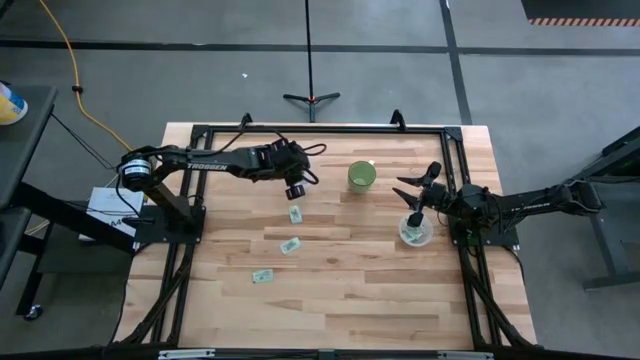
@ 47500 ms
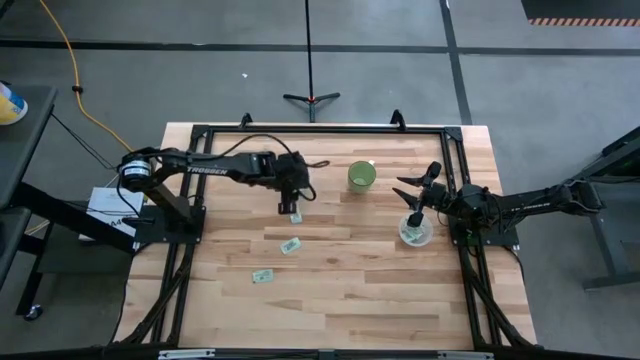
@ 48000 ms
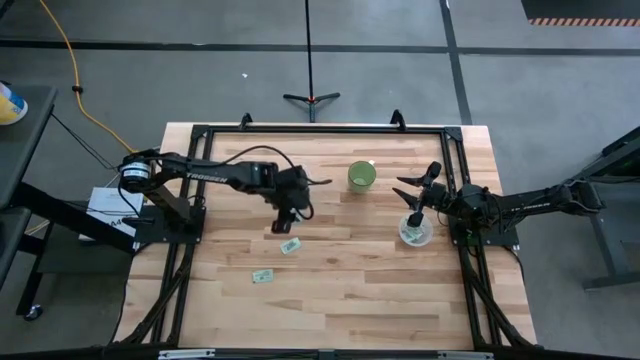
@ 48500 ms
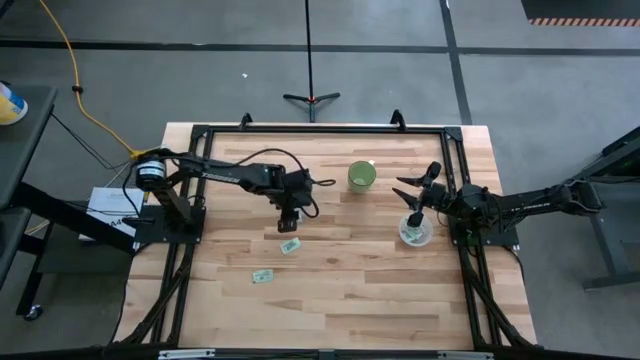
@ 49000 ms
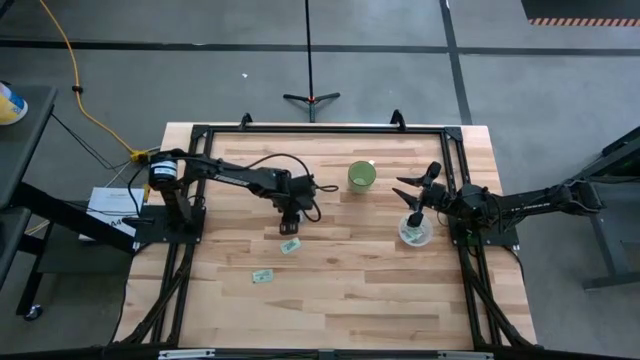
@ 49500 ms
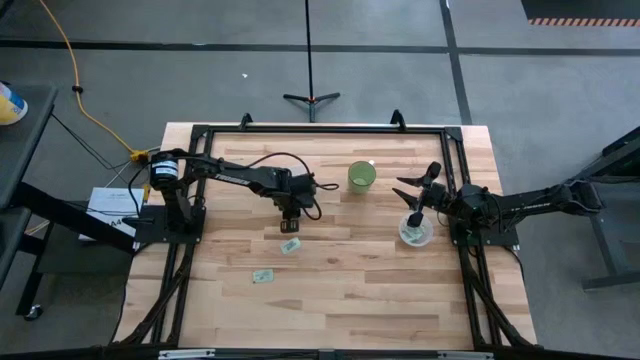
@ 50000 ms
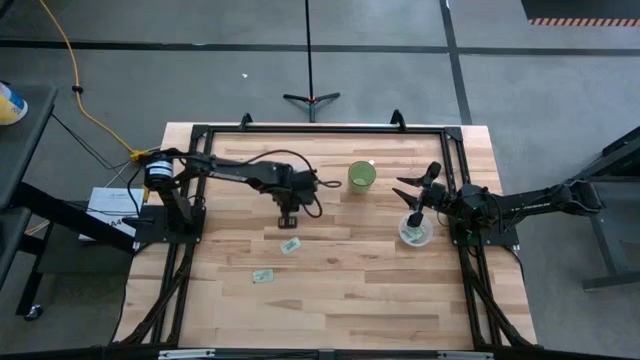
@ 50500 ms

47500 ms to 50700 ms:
Task: Pick and place items into bin
Put the white sweetener packet into the left transparent bin

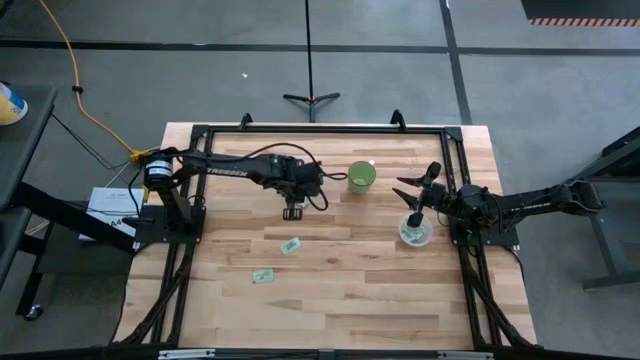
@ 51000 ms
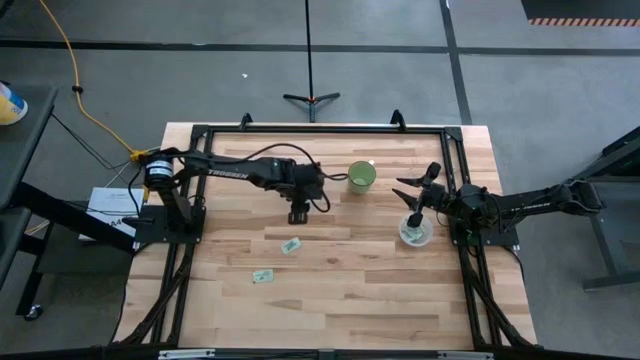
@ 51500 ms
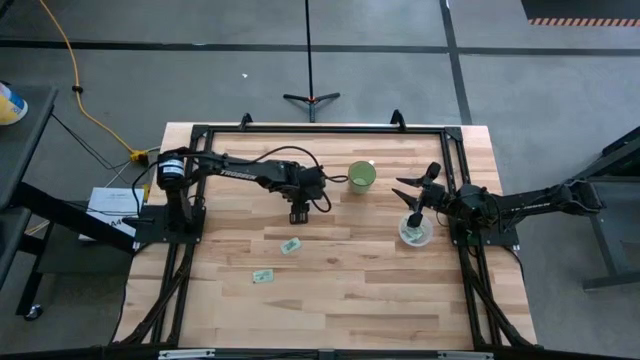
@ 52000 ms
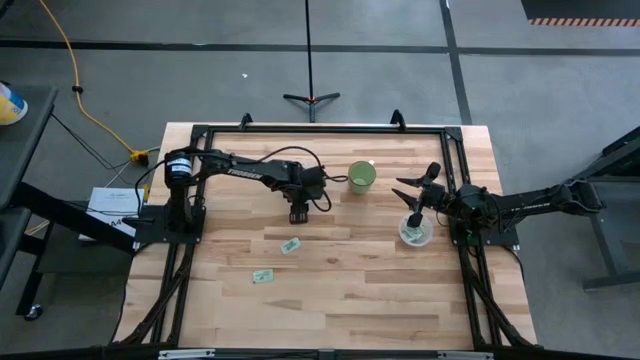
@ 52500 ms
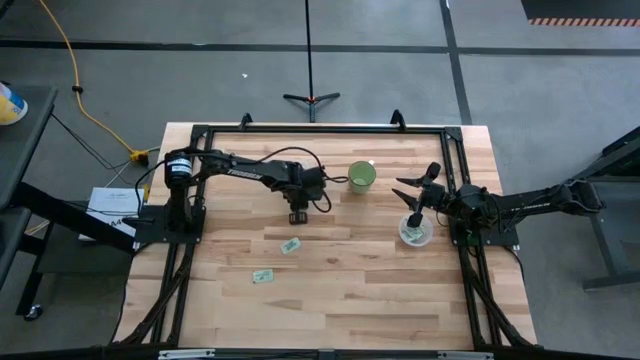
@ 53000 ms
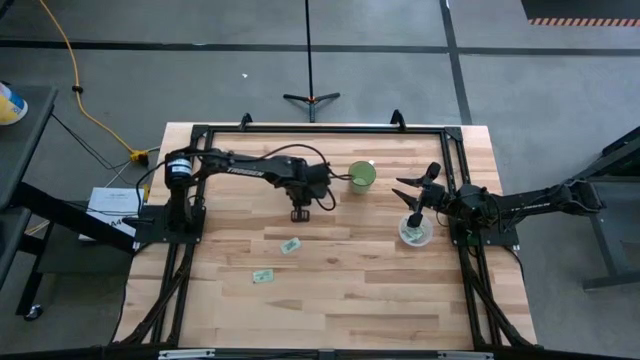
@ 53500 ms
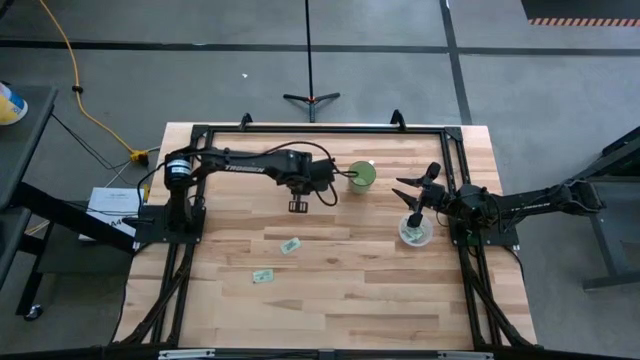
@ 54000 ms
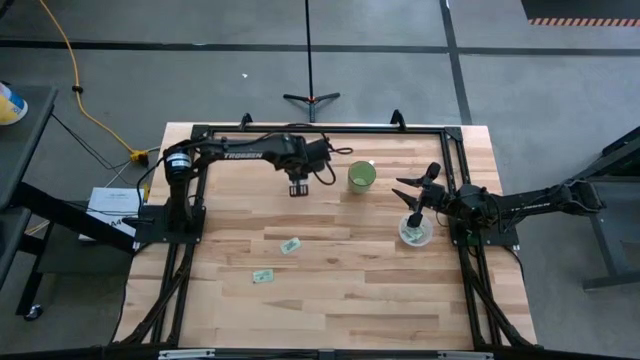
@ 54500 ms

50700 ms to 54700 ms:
Put the white sweetener packet into the left transparent bin

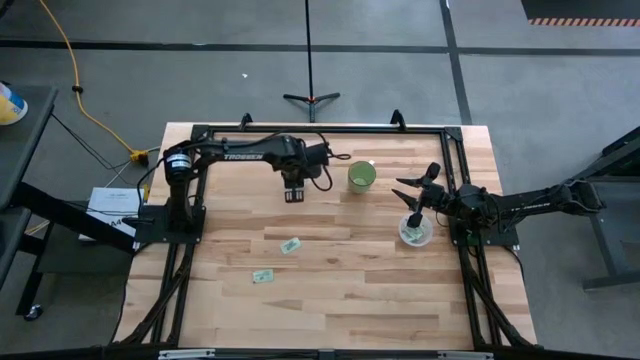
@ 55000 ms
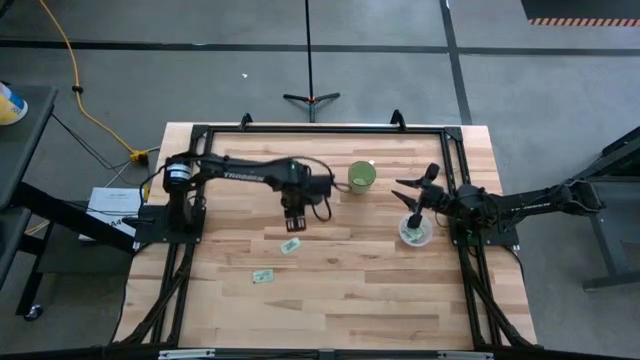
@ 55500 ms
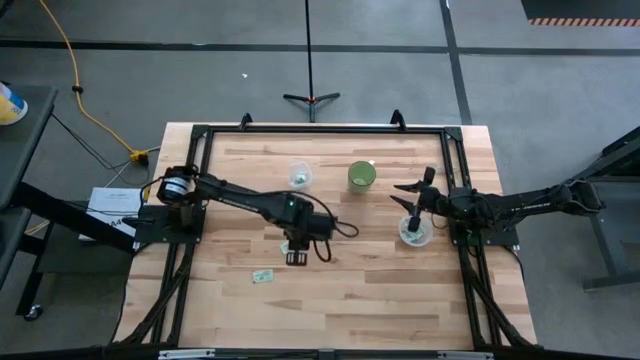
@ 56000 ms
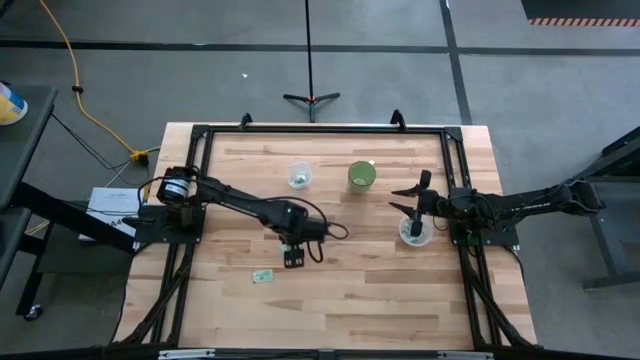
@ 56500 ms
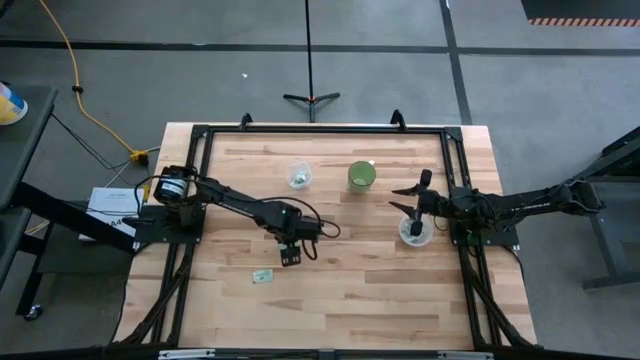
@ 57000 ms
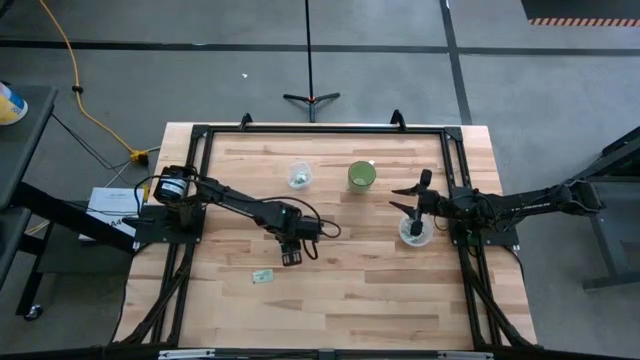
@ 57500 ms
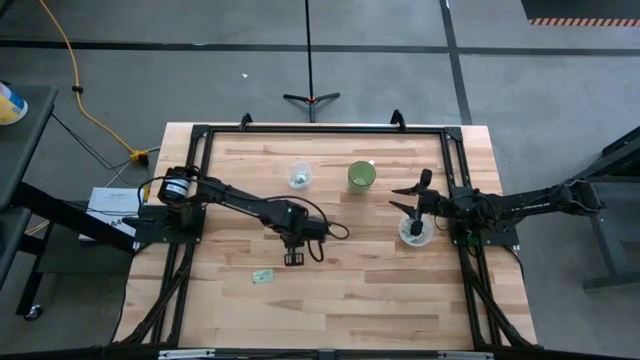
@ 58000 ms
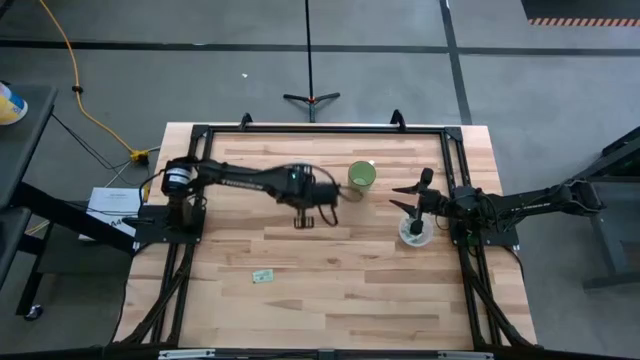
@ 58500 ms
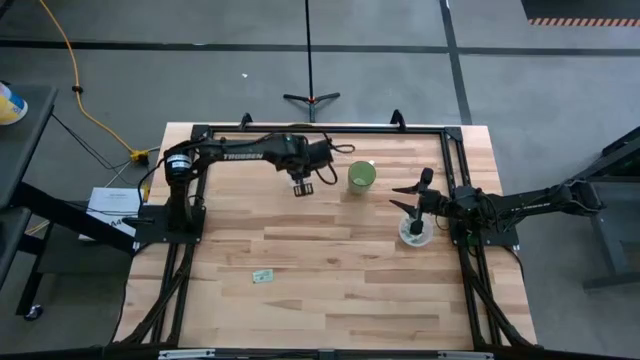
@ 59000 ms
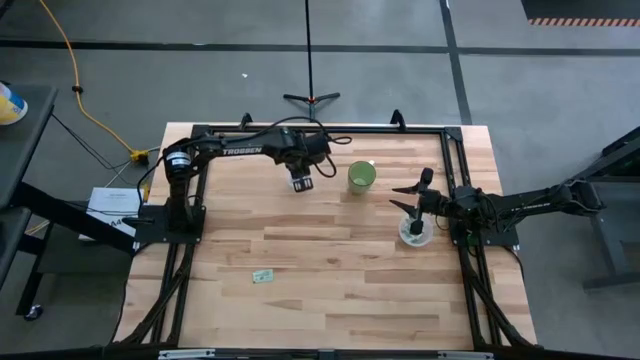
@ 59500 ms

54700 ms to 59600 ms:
Put the white sweetener packet into the left transparent bin

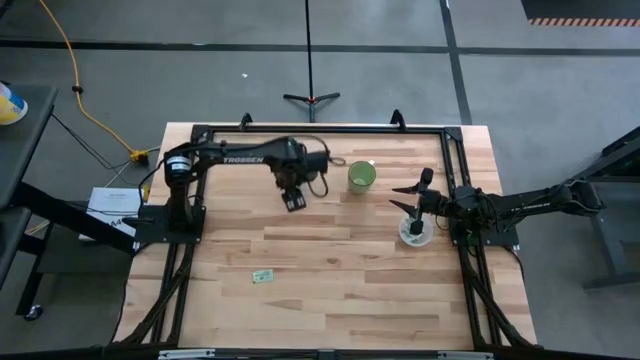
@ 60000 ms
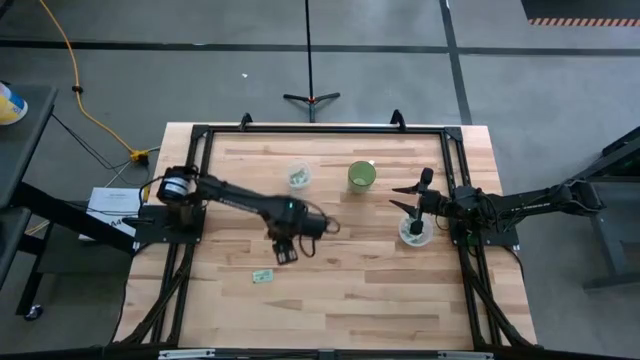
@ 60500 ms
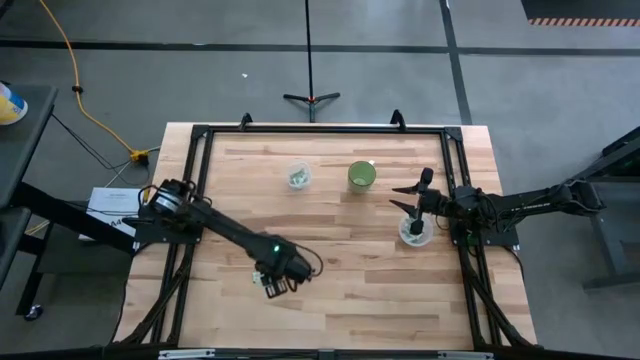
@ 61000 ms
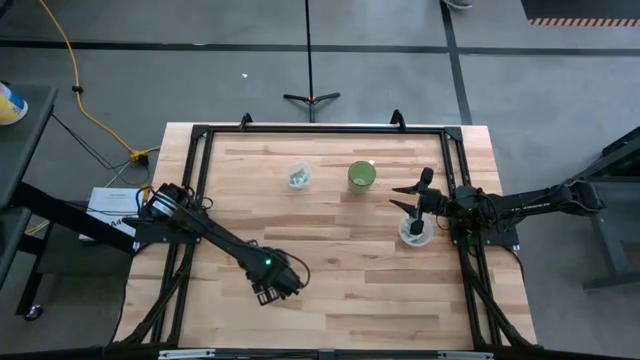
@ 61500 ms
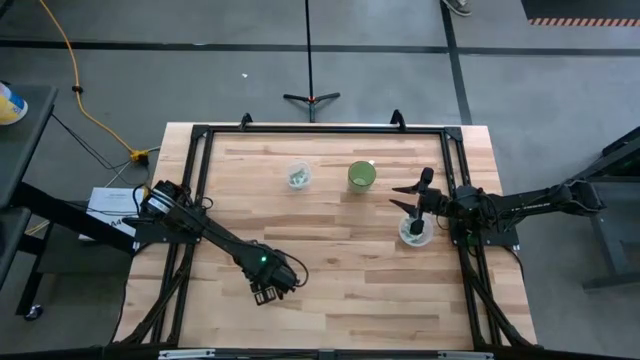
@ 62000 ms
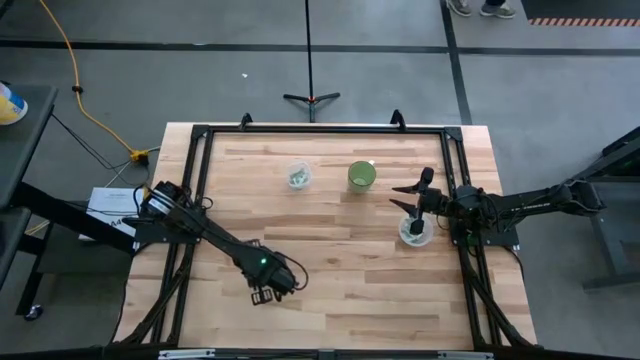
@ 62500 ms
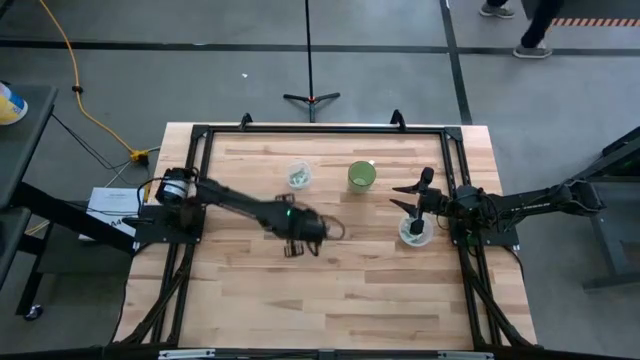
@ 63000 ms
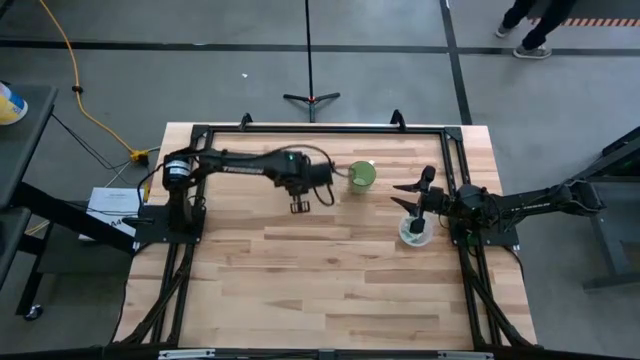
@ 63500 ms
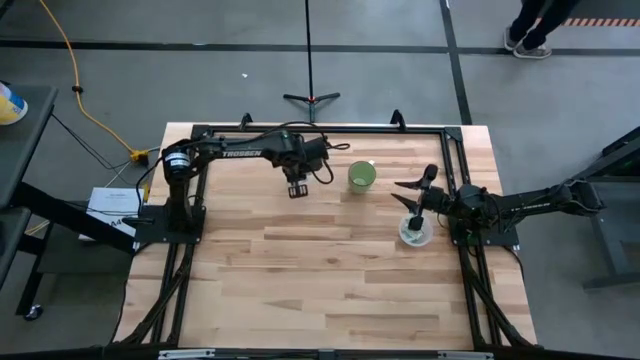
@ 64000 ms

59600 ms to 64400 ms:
Put the white sweetener packet into the left transparent bin

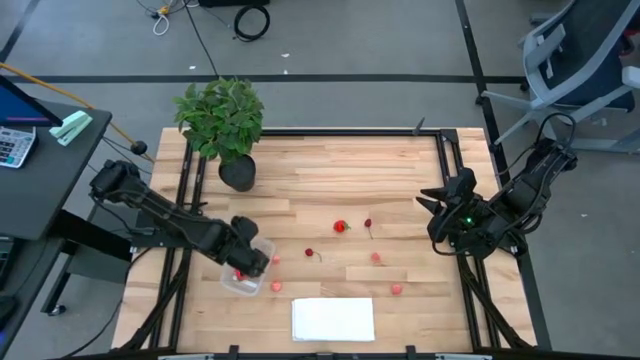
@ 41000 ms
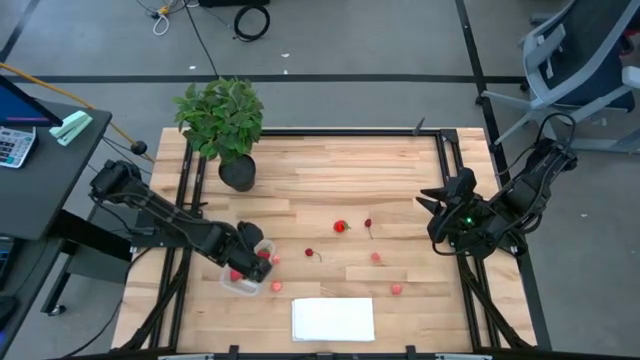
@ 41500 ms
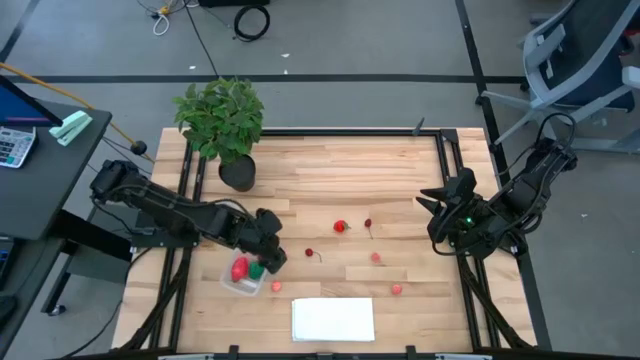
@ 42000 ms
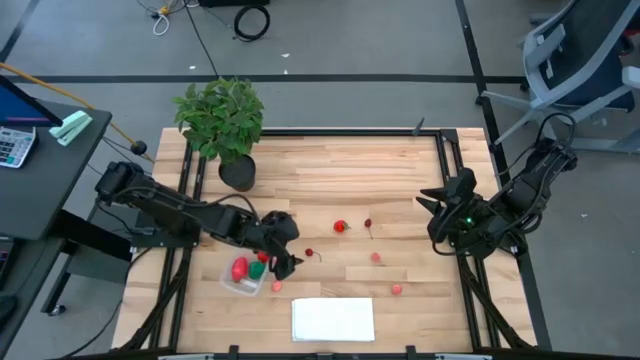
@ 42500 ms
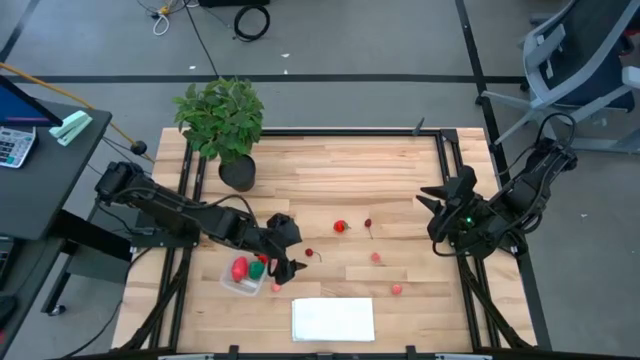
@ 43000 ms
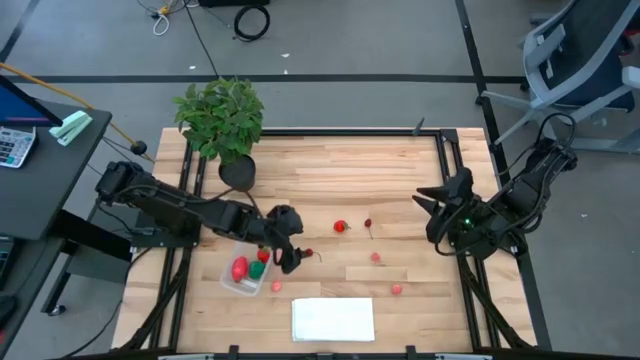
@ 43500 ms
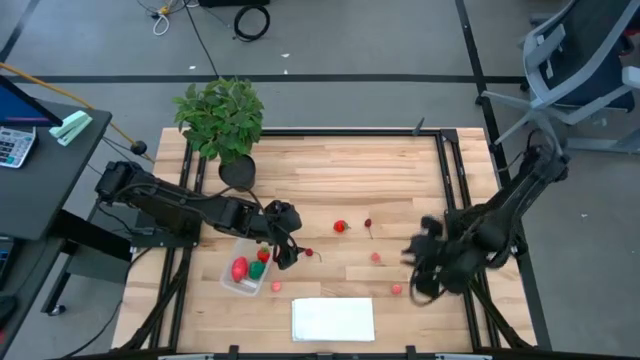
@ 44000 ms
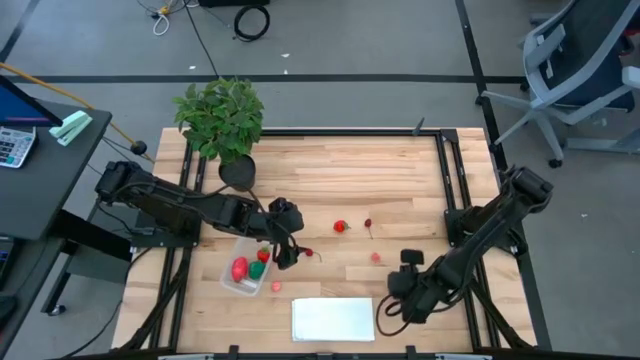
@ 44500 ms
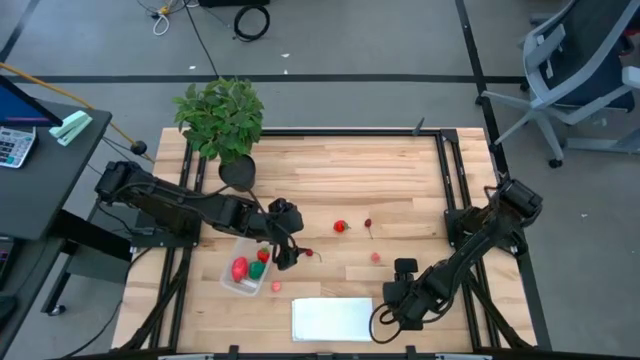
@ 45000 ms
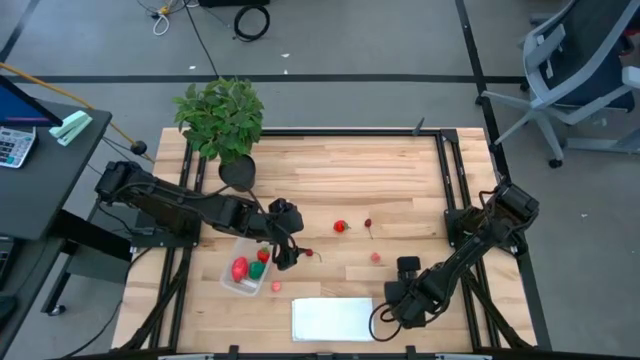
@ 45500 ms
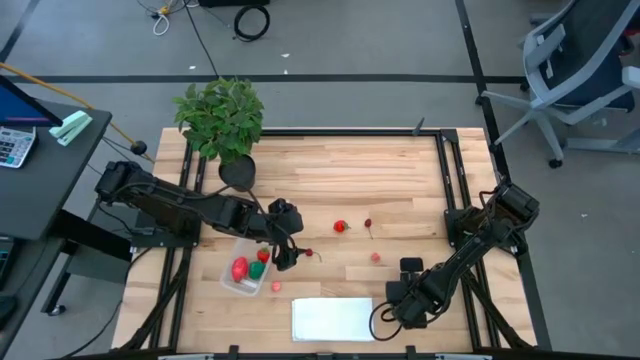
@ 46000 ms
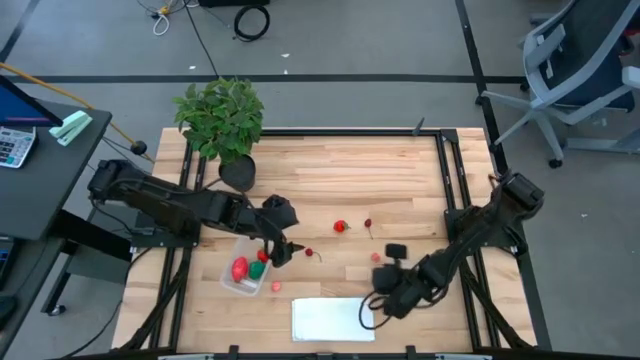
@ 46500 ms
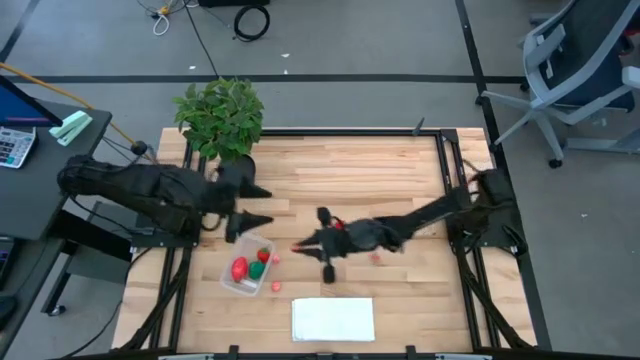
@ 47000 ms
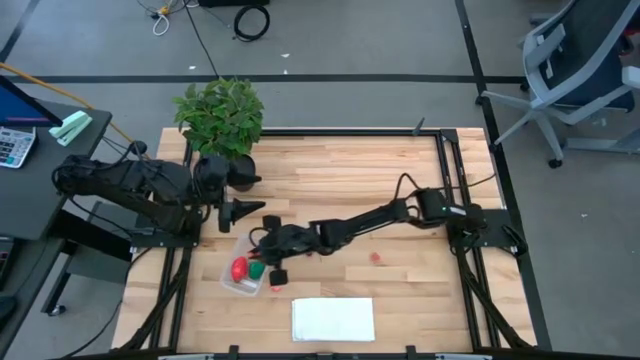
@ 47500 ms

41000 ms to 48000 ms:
Task: Pick and placing Produce into tupperware
Put the pink peach into the transparent bin
